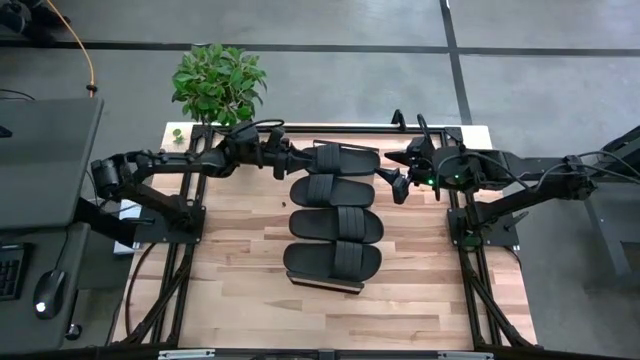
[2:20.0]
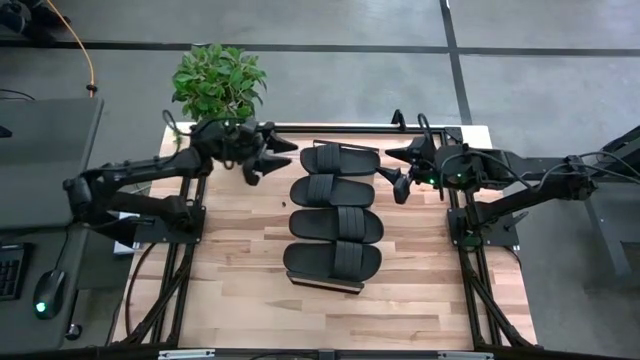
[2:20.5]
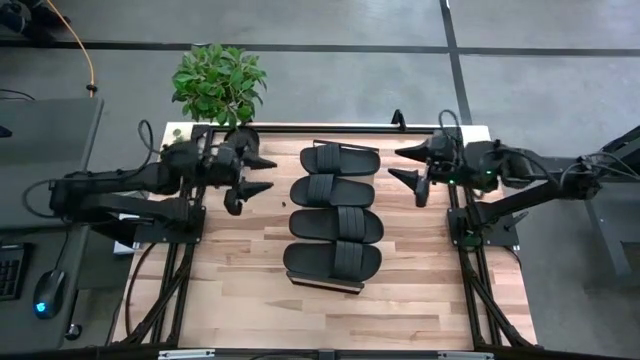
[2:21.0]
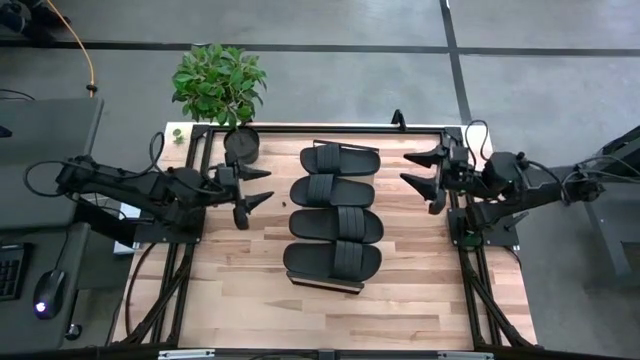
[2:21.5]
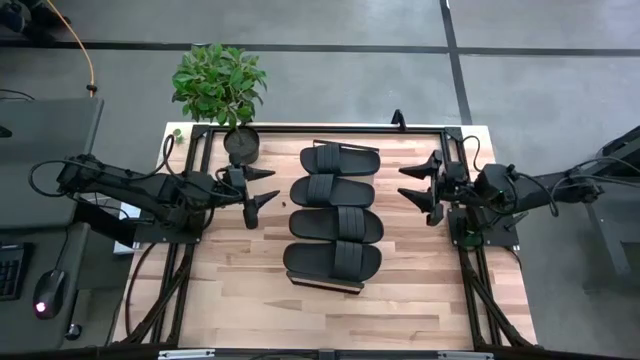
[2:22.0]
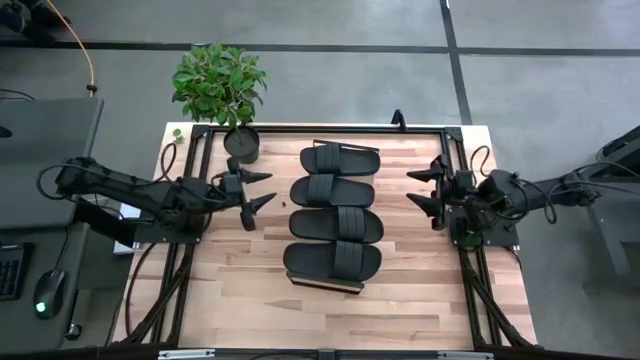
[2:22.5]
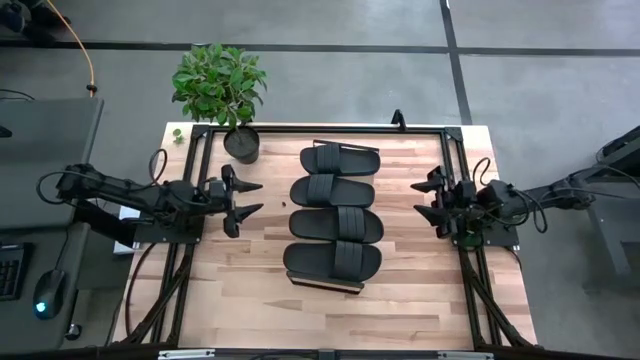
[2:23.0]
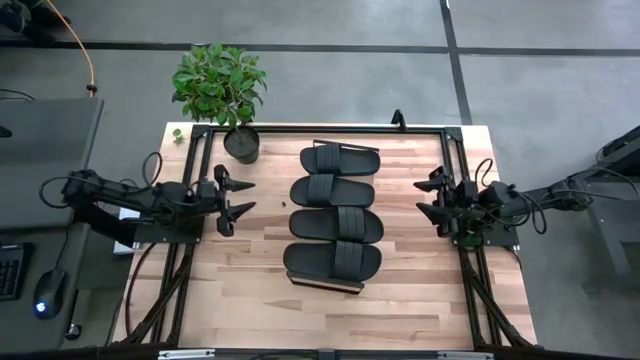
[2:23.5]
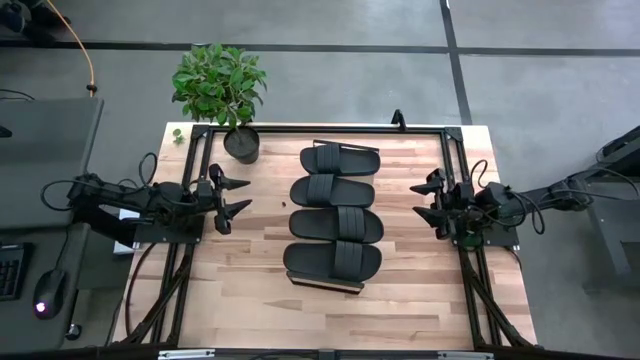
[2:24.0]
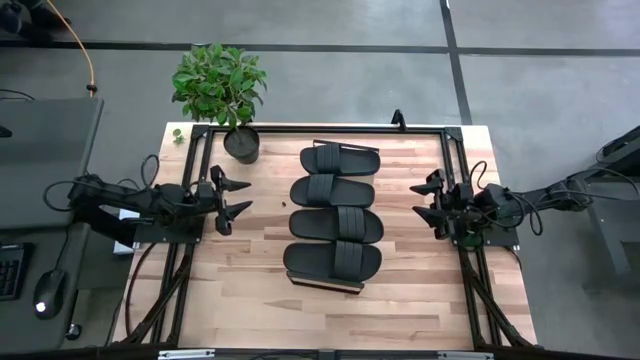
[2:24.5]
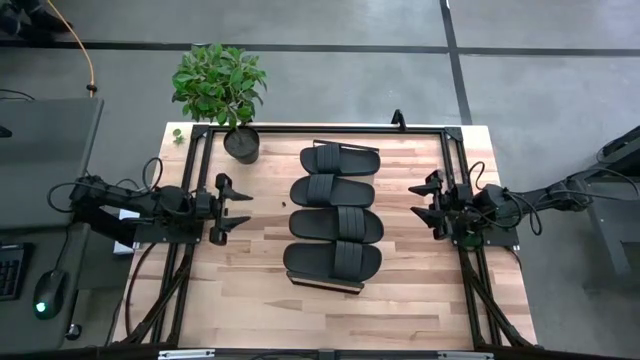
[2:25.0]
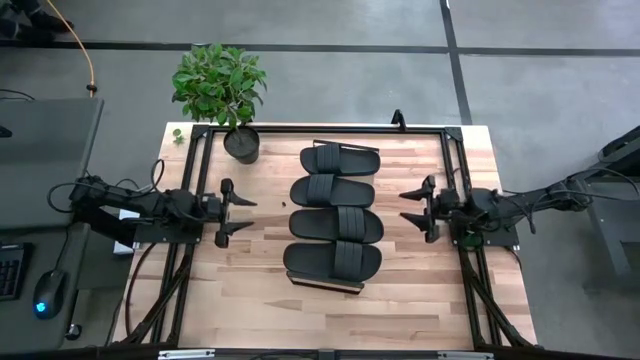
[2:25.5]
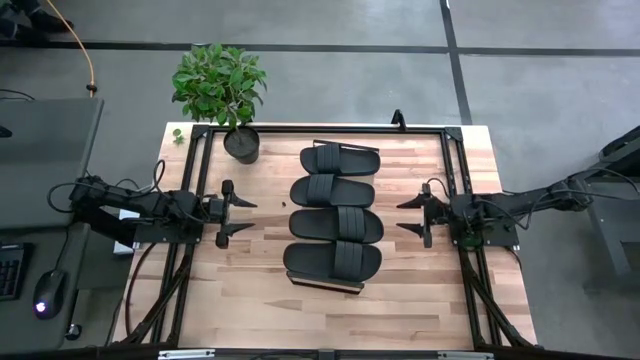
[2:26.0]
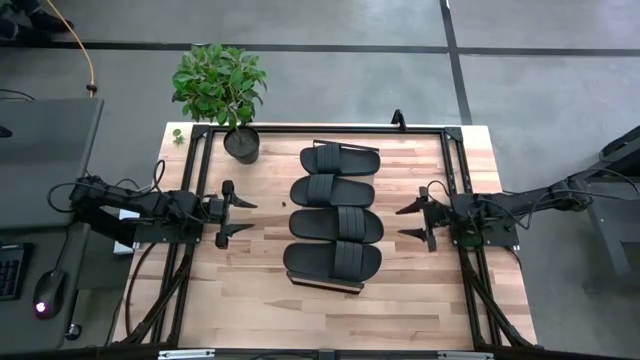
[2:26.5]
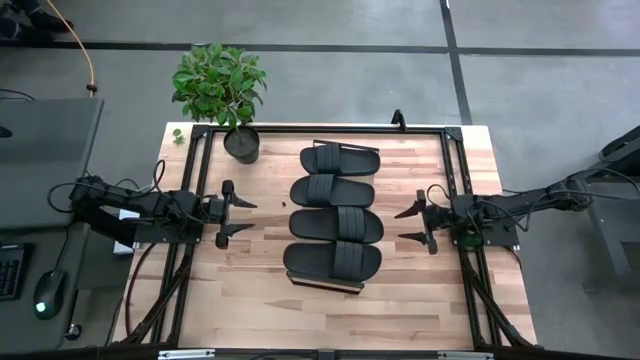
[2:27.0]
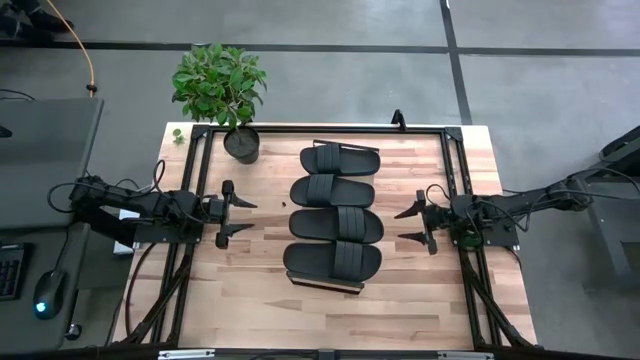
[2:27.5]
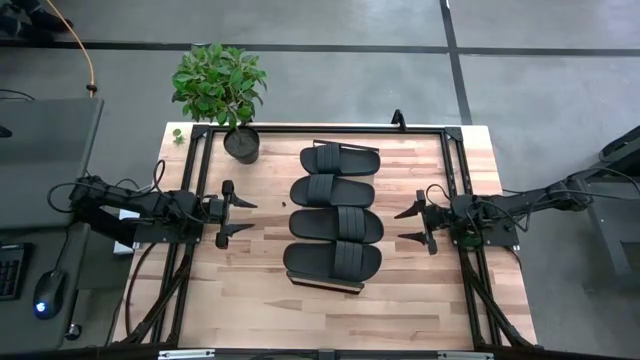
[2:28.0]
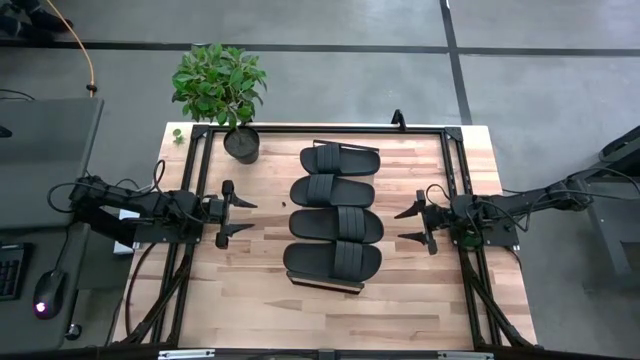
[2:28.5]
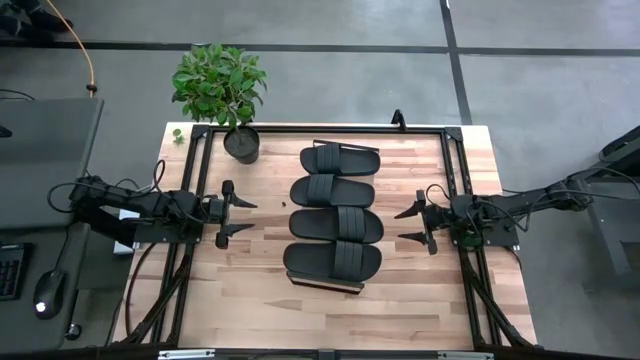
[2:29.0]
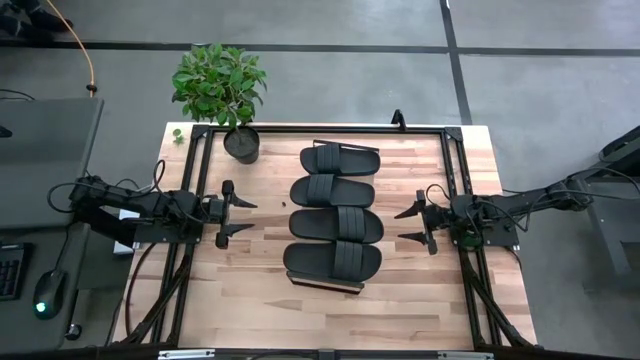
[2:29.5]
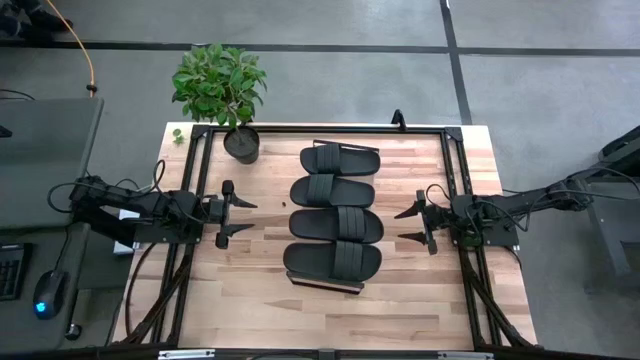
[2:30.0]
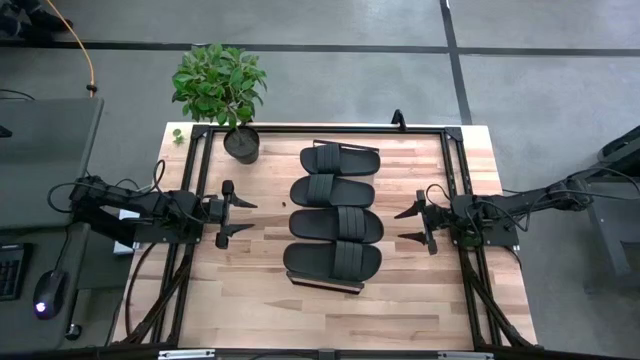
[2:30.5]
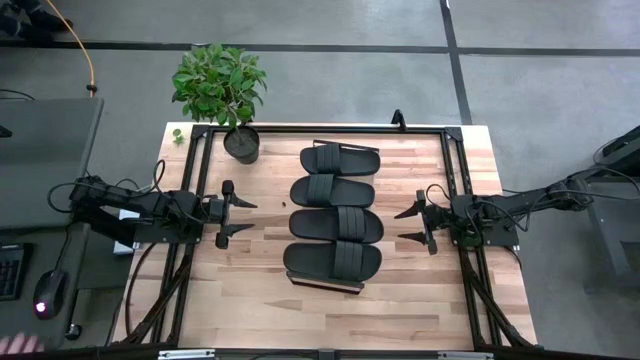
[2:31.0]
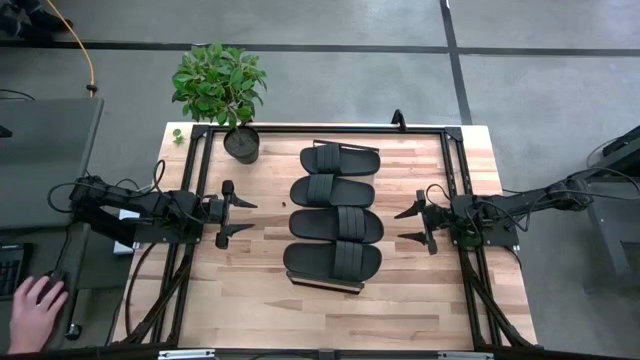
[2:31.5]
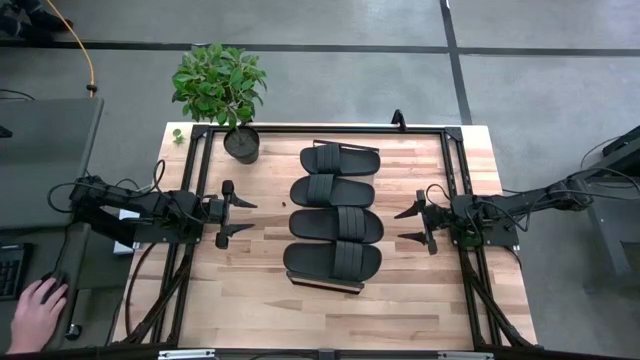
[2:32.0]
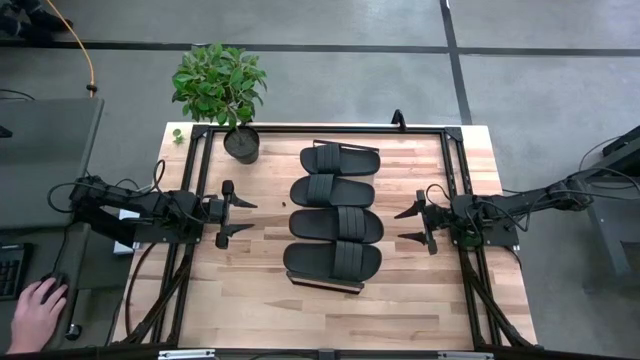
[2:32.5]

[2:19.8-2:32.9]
Task: Pick and place slides into the shelf
Return to Home Position

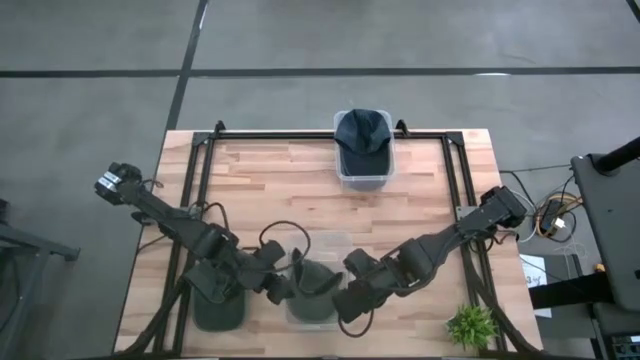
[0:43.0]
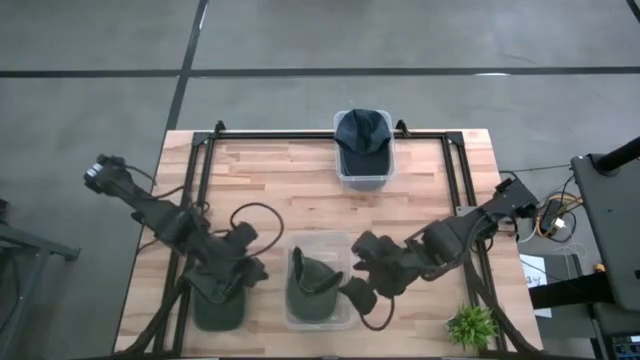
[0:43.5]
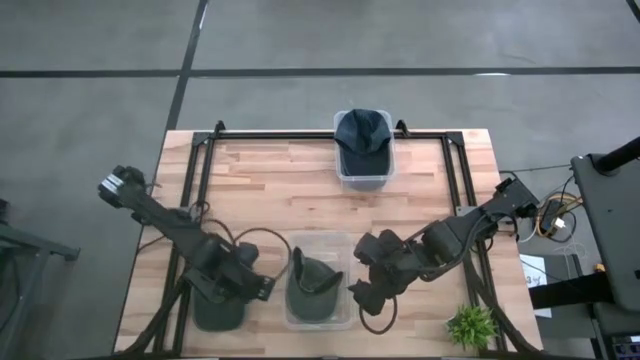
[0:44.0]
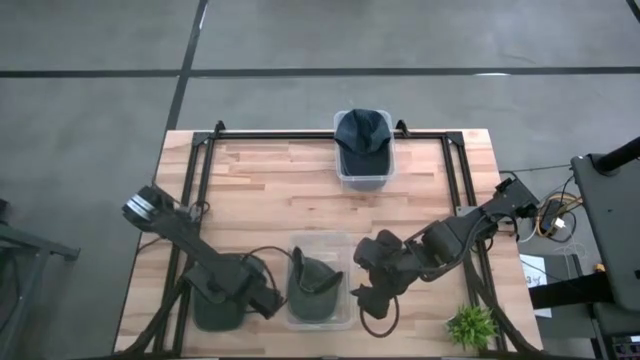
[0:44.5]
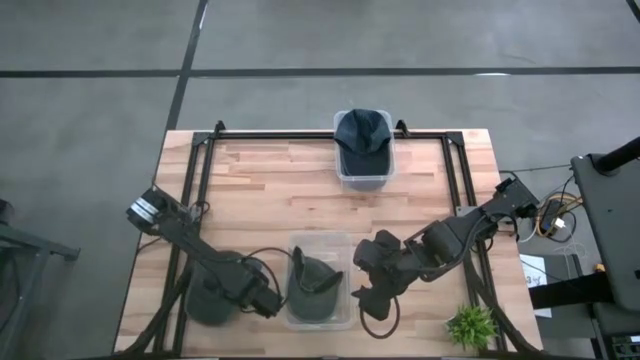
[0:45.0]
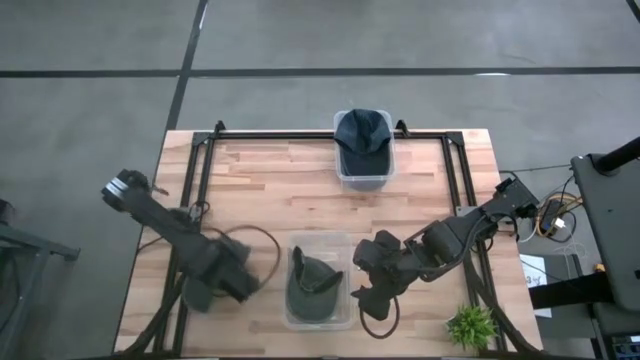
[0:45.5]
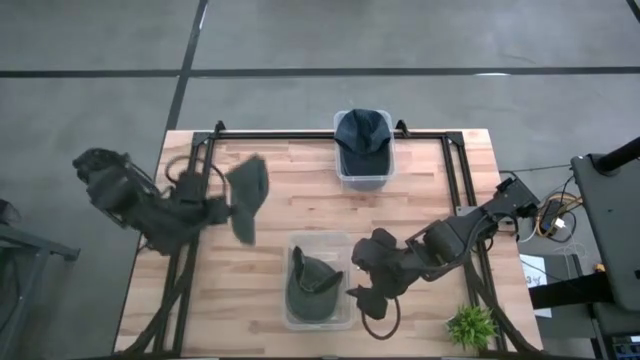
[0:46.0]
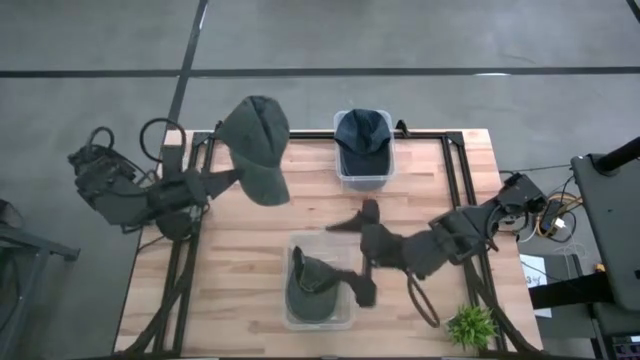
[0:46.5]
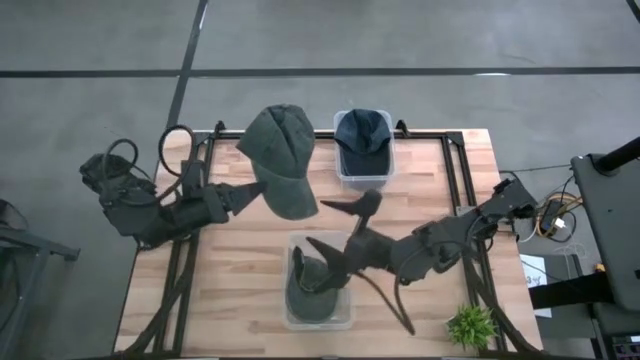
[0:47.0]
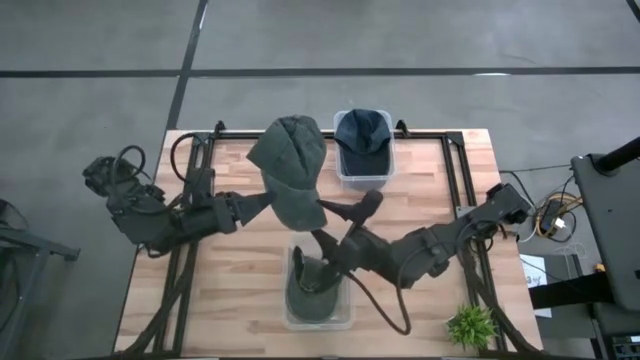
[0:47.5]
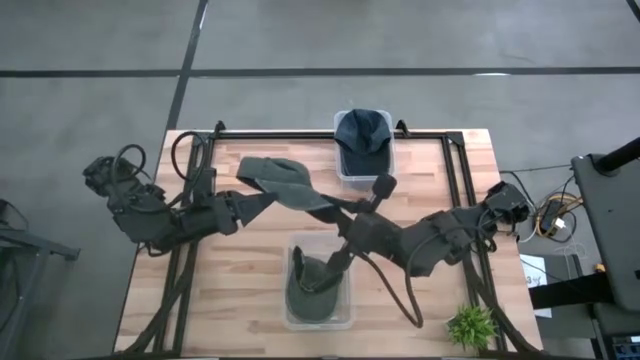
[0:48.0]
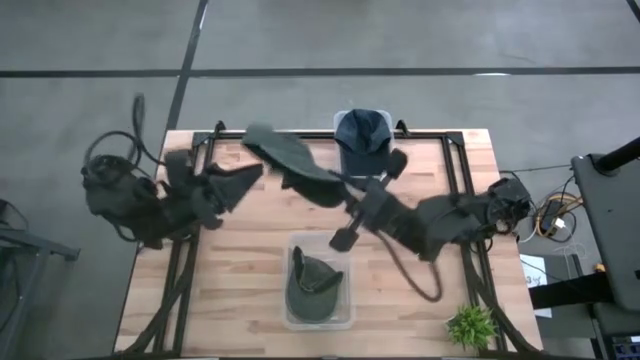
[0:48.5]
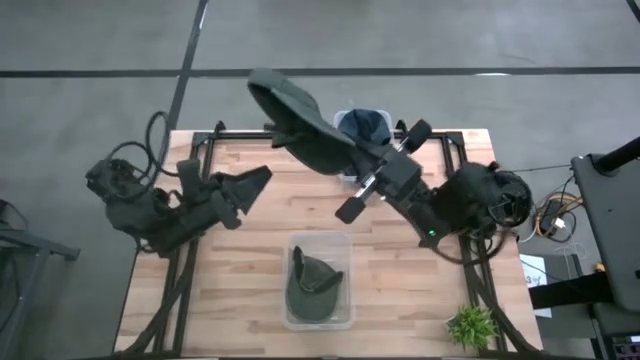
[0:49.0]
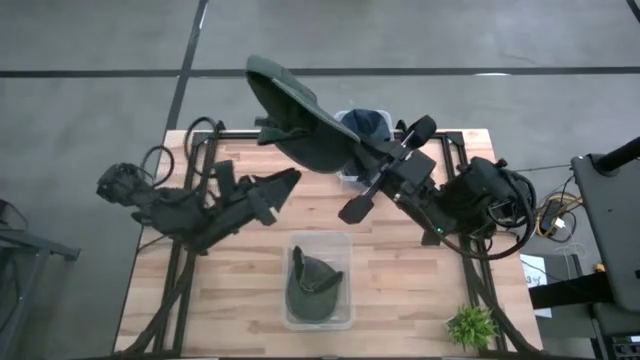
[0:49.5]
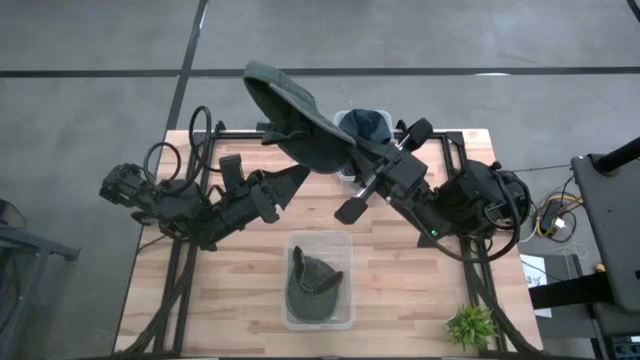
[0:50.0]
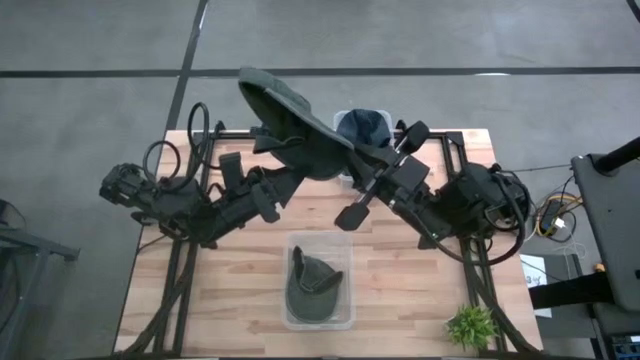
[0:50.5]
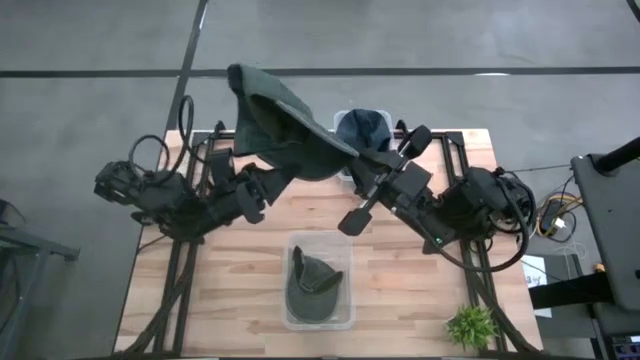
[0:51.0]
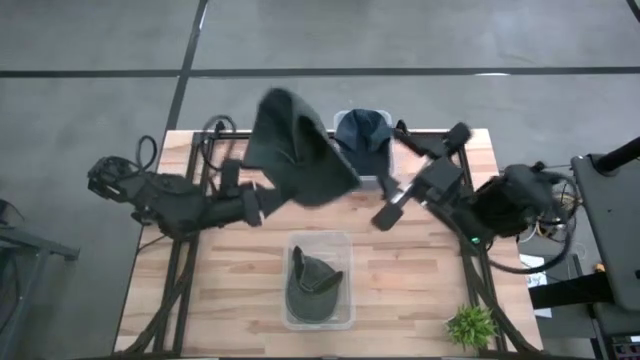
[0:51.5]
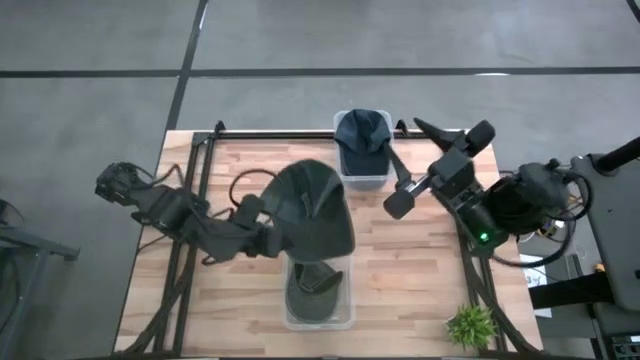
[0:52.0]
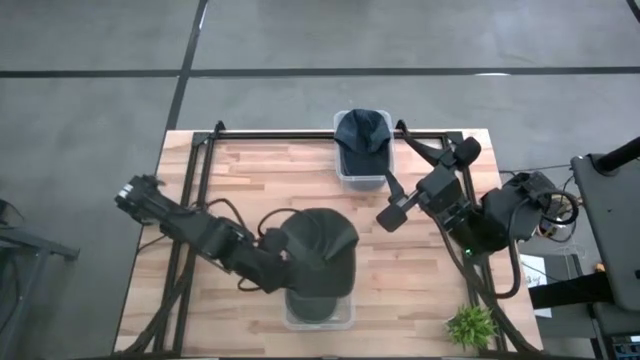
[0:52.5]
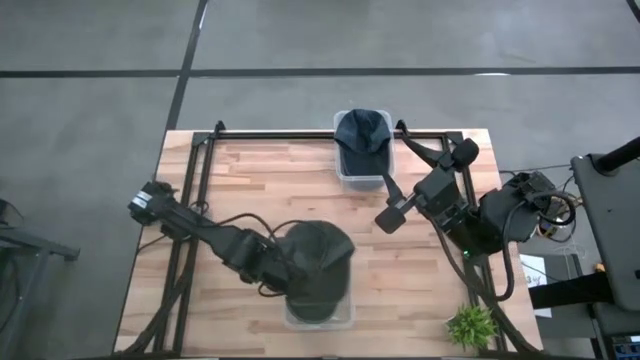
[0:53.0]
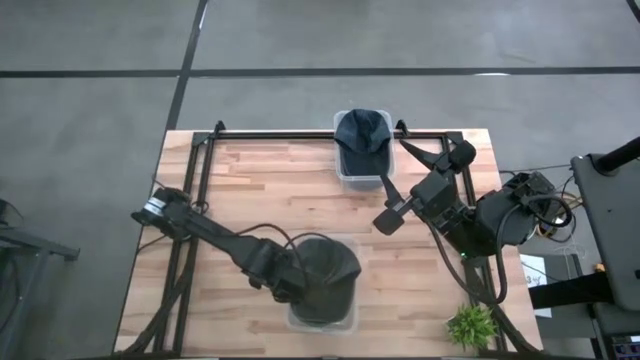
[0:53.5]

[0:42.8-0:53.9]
Task: Pick & Place hat
Put the gray cap into the bottom transparent bin
